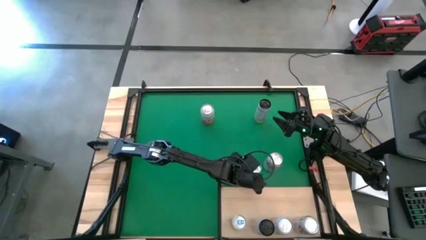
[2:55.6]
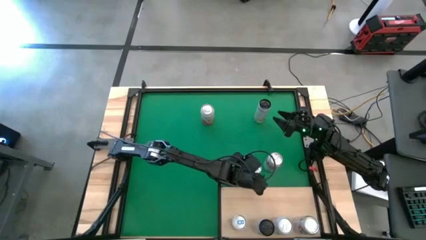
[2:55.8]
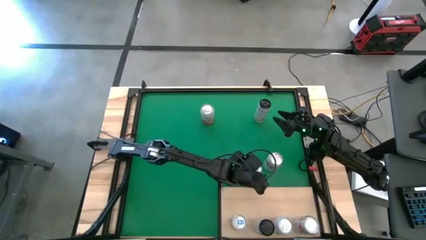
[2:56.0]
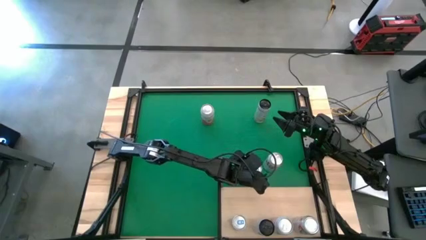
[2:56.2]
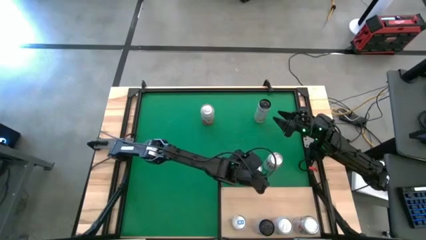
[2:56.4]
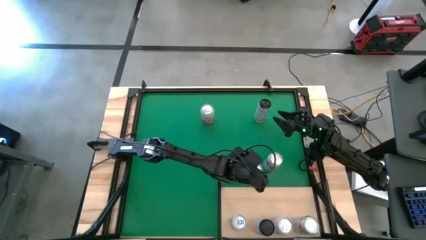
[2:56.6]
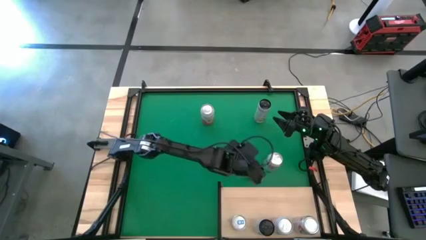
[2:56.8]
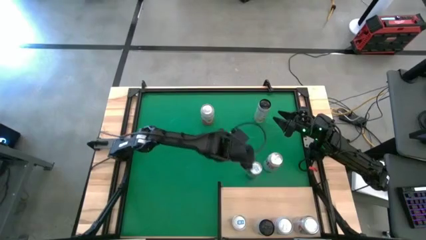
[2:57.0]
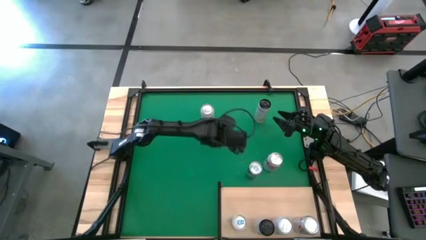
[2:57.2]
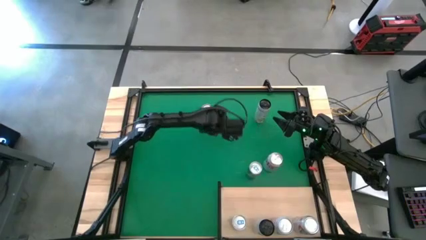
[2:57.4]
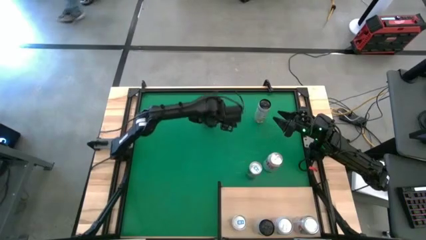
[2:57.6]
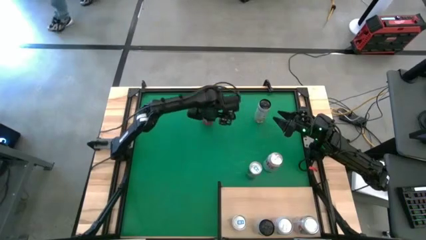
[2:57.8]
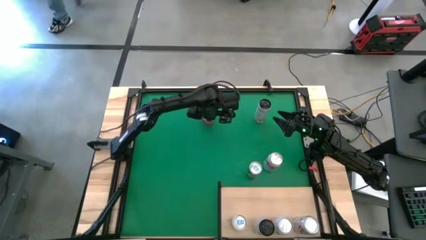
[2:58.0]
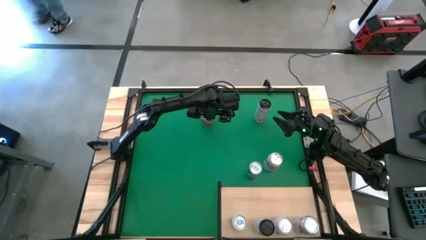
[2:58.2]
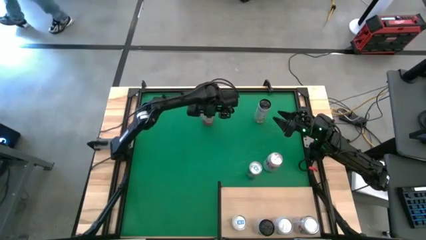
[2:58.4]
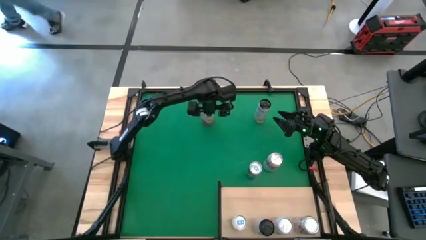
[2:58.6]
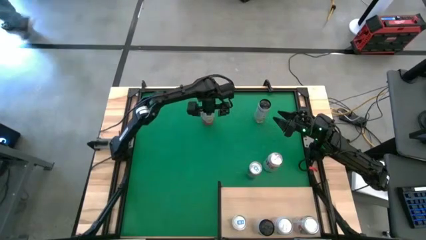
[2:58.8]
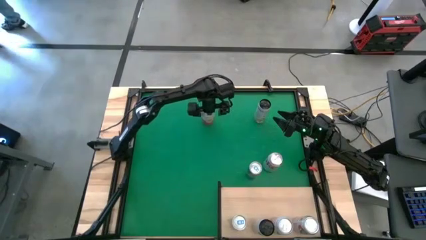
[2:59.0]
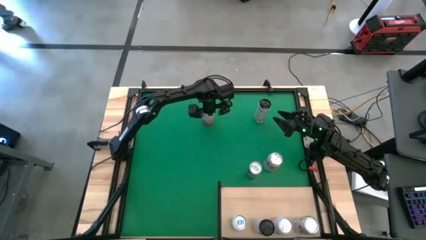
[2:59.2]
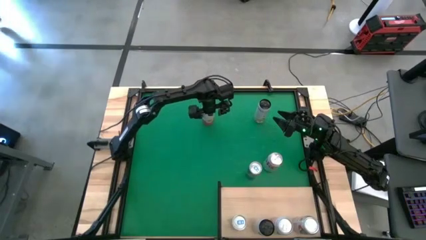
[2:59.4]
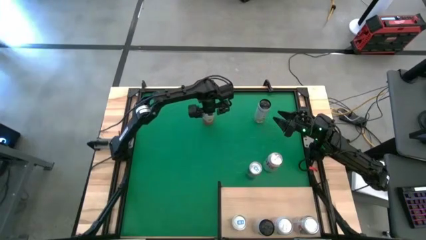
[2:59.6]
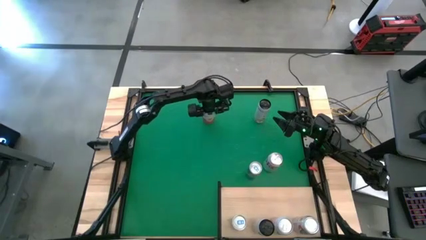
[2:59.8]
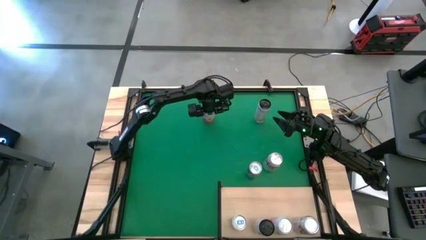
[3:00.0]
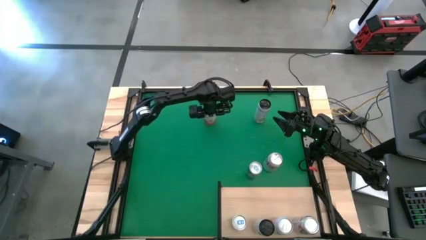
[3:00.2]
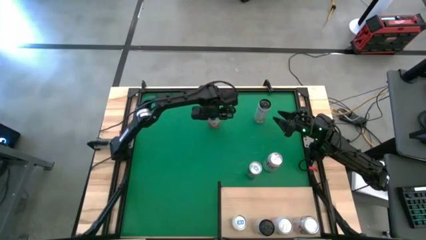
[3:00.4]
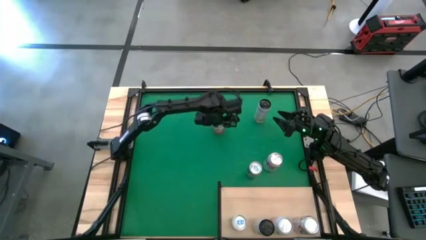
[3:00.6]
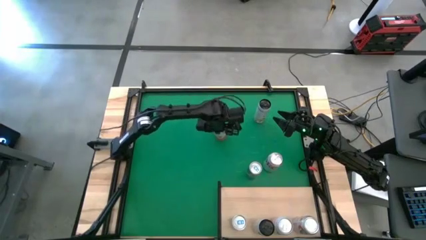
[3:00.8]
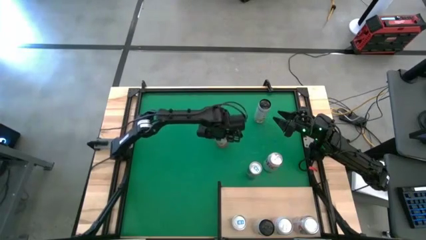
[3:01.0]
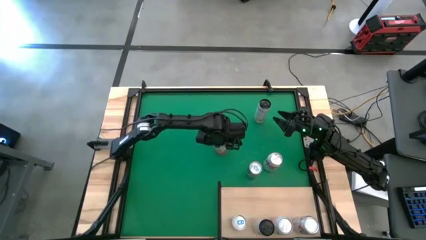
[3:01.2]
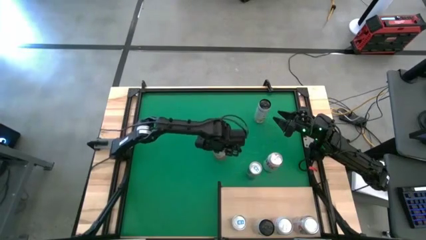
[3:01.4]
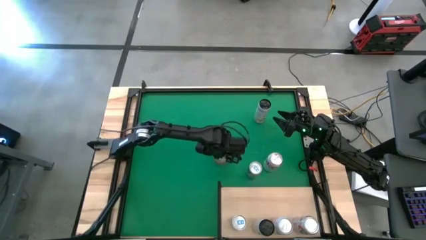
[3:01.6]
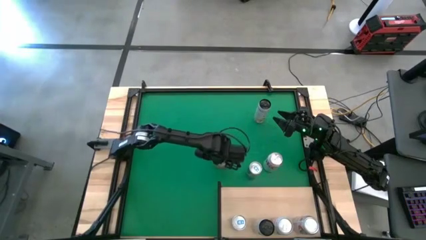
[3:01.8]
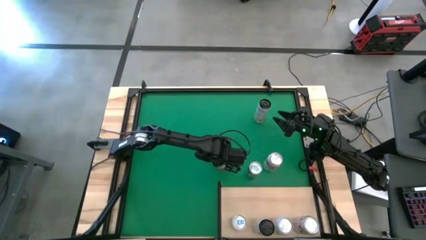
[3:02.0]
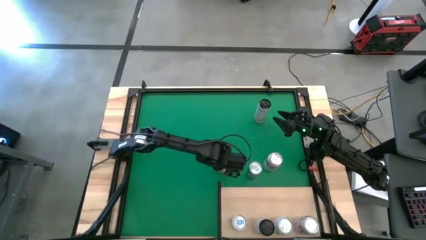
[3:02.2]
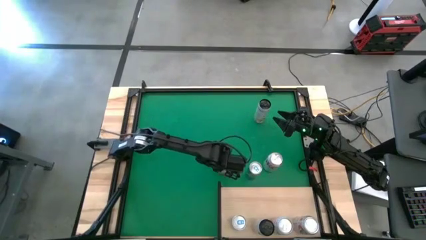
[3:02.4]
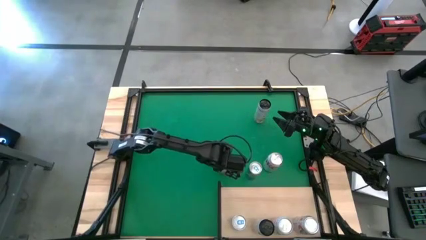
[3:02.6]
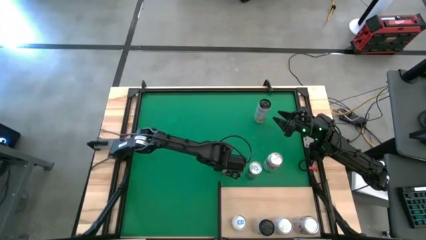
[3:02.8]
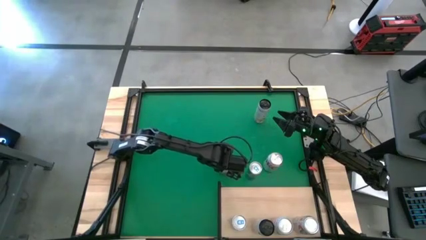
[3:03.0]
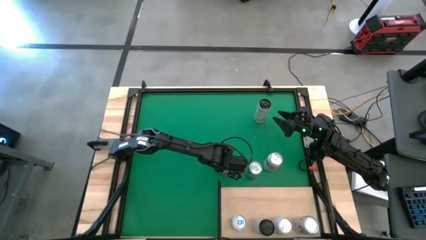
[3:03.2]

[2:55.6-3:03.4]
Task: Place canned beverage on shelf
Move the pink-white soda can near the shelf

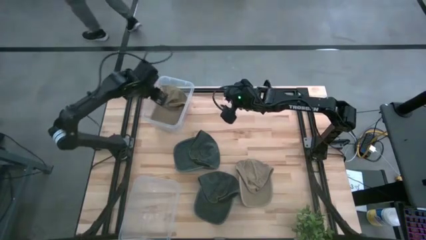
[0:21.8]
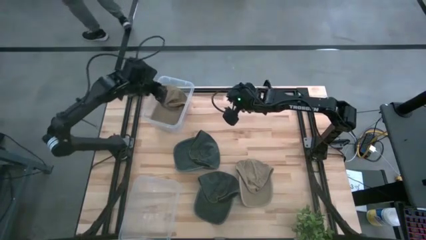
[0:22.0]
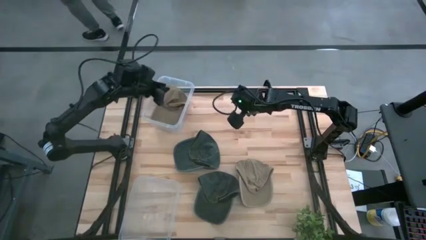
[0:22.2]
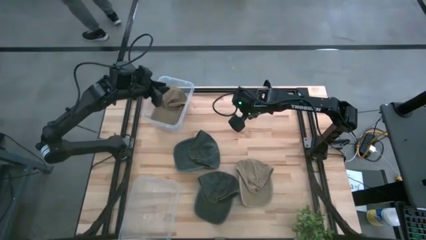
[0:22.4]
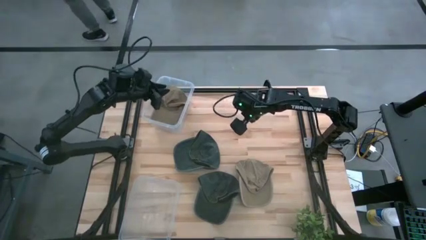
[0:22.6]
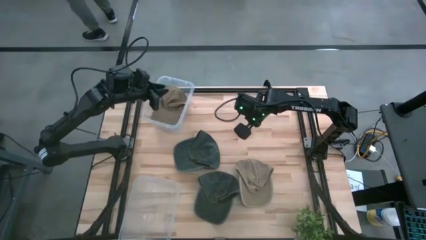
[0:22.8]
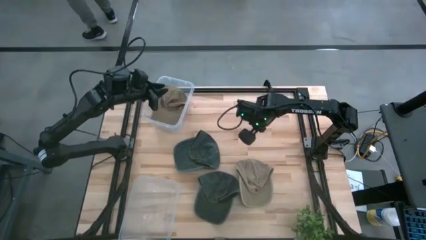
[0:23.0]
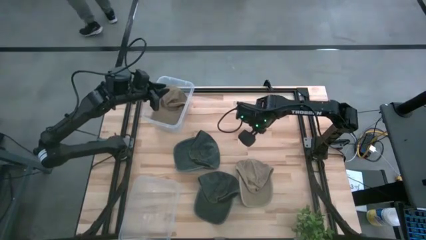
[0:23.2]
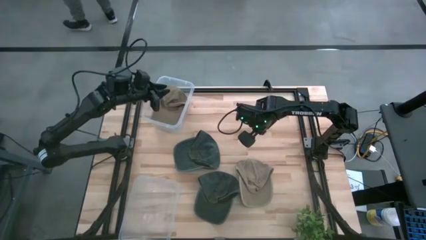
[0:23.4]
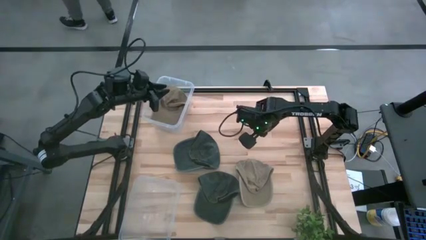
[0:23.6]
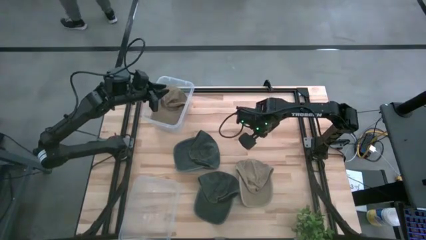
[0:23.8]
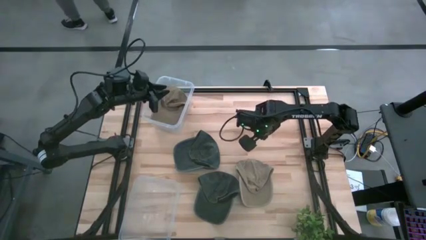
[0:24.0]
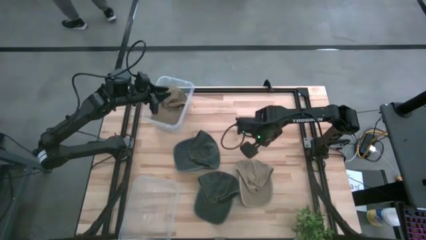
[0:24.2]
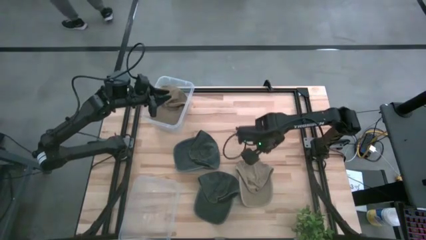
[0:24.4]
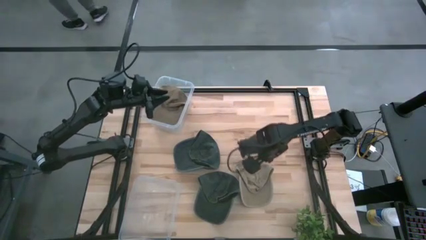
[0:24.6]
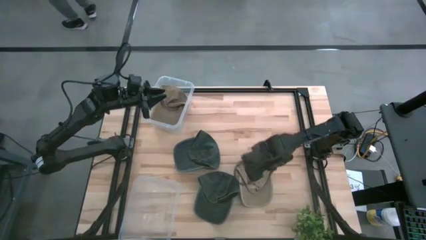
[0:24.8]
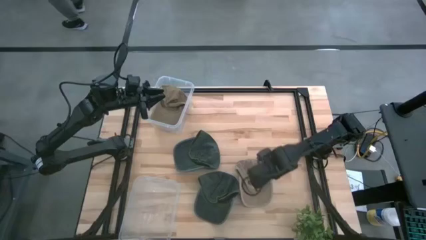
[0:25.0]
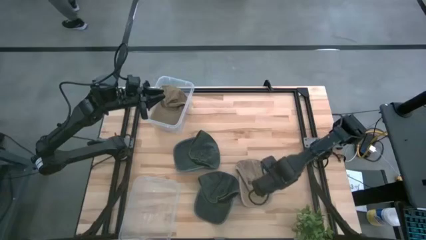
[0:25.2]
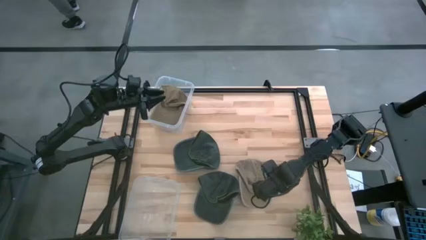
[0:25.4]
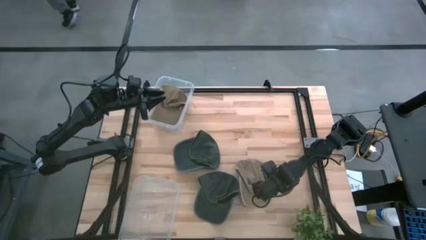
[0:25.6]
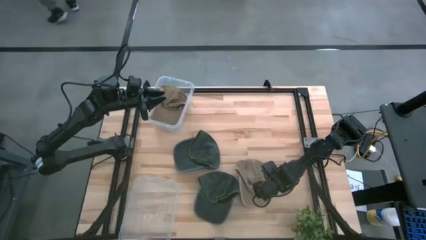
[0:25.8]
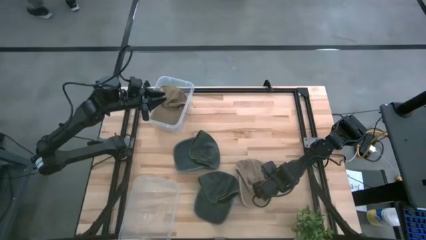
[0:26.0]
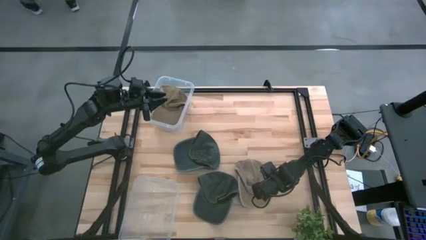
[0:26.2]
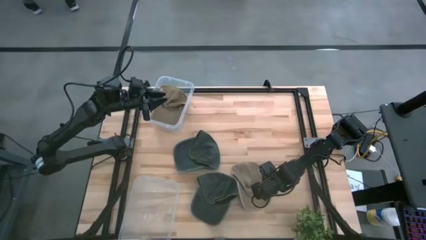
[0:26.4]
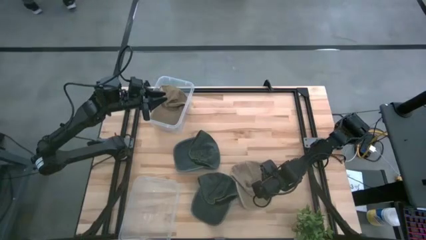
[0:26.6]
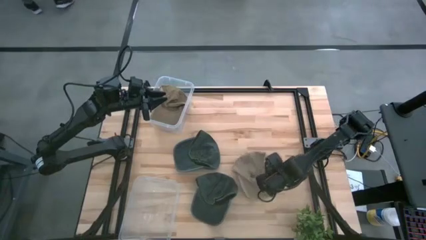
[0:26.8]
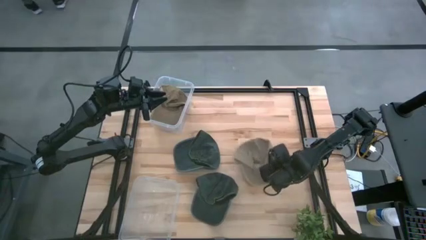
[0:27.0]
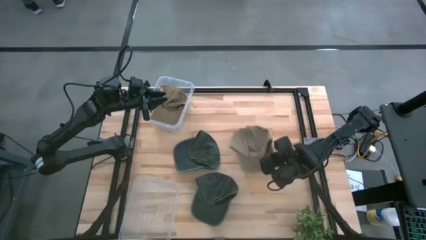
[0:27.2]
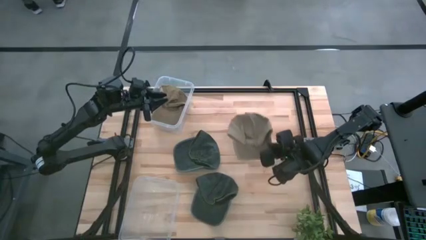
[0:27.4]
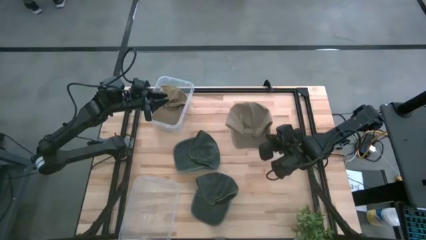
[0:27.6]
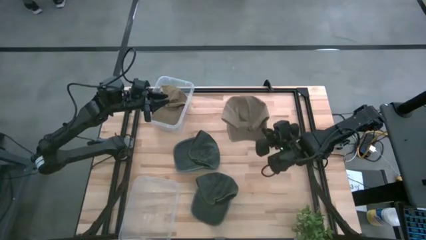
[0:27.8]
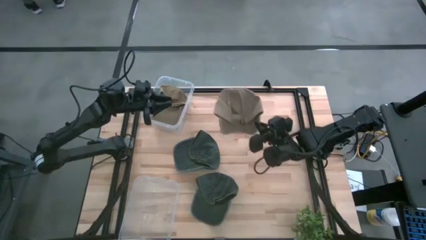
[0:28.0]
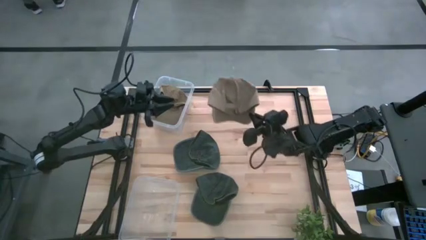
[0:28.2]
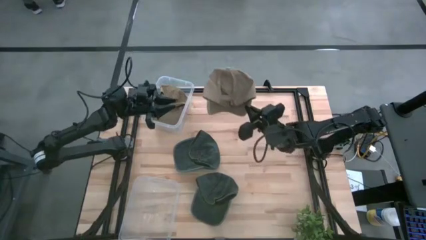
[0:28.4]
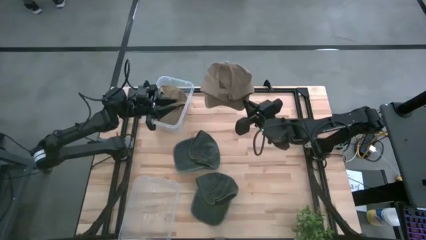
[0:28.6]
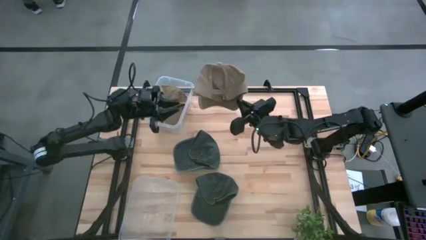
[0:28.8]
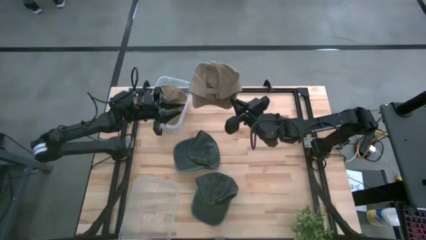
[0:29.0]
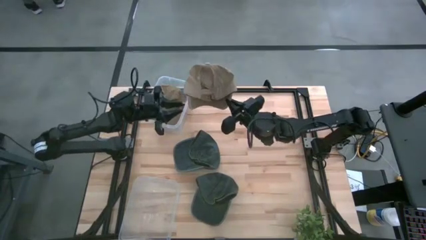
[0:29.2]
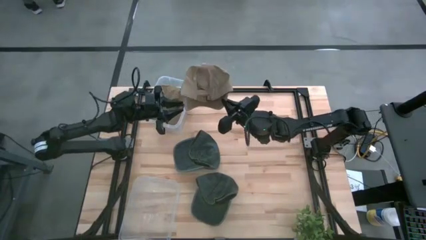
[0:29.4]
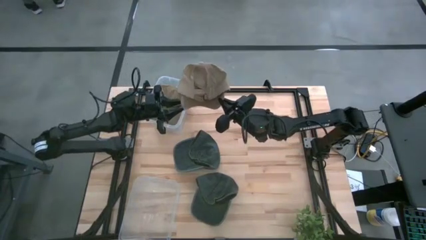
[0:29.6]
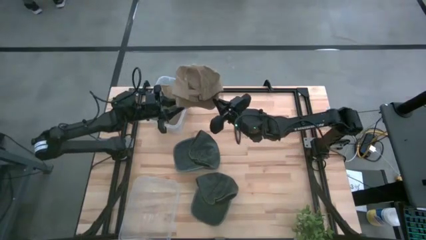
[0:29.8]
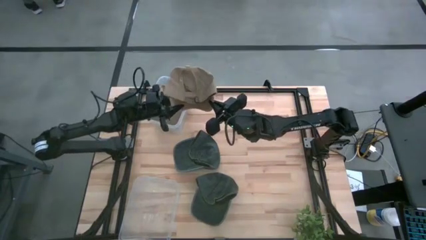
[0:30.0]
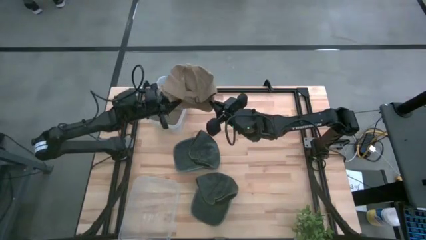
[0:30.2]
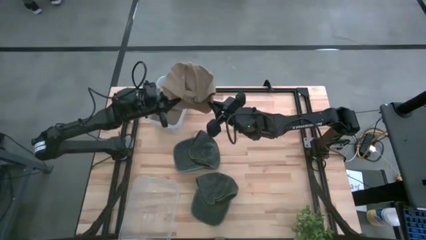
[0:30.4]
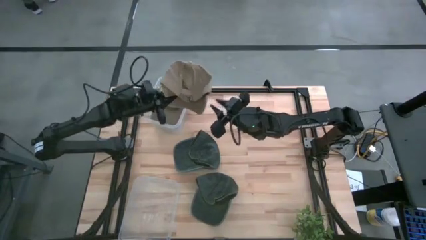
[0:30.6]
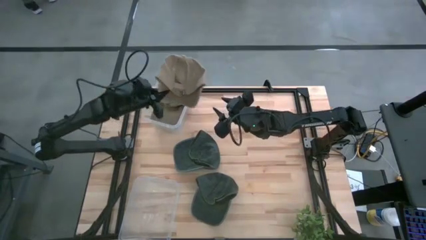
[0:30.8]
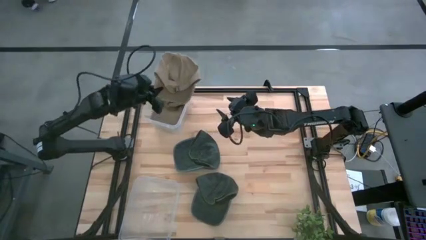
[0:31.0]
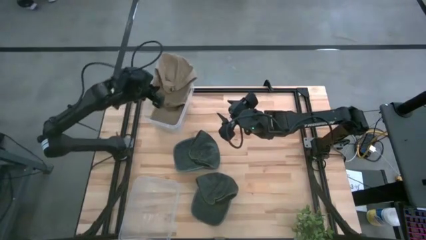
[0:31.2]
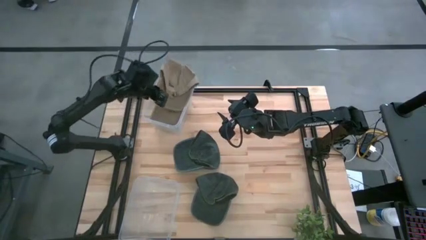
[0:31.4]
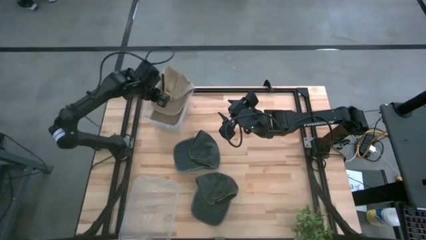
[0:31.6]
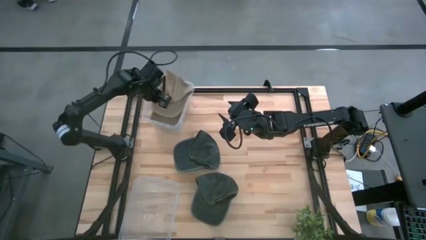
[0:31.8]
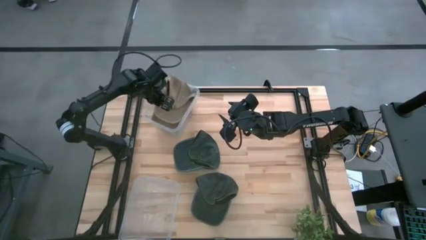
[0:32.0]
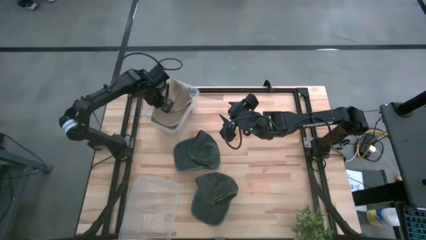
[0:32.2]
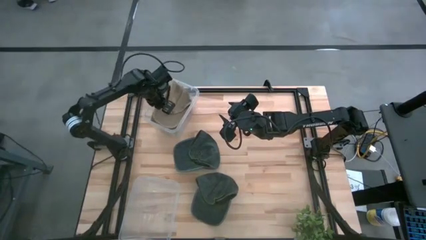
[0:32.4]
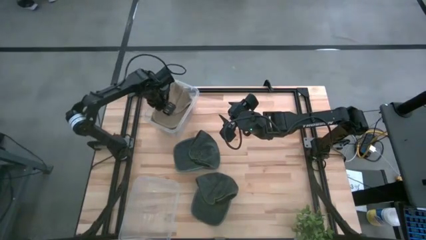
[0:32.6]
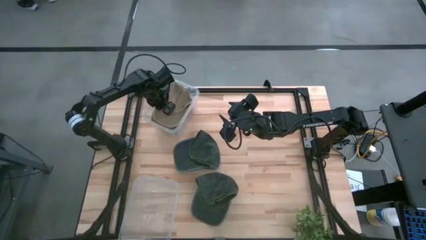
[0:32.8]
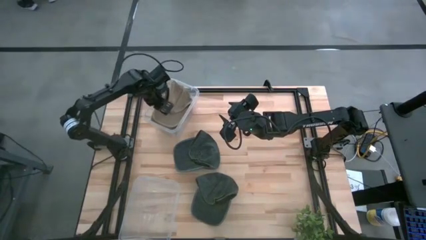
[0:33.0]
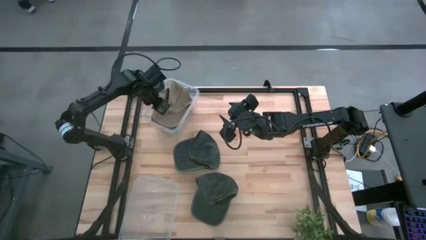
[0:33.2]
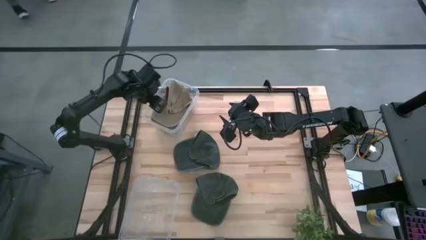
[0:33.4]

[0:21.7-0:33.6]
Task: Pick and place caps into container
Put the brown cap into the top transparent container
